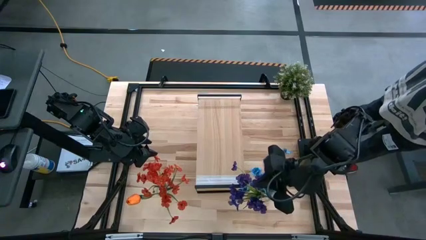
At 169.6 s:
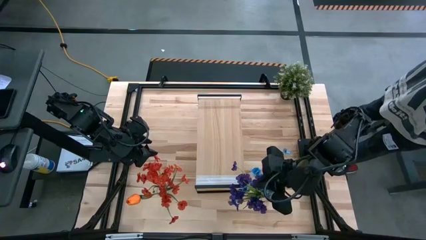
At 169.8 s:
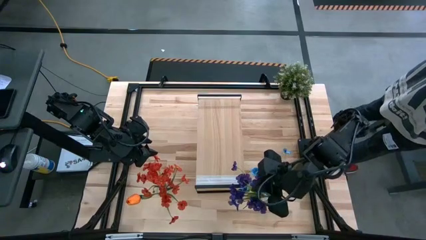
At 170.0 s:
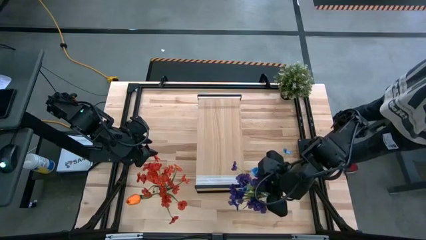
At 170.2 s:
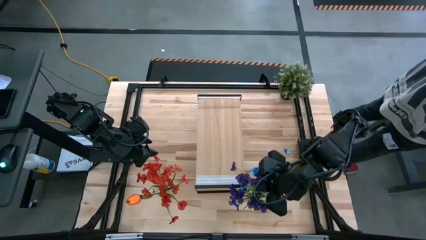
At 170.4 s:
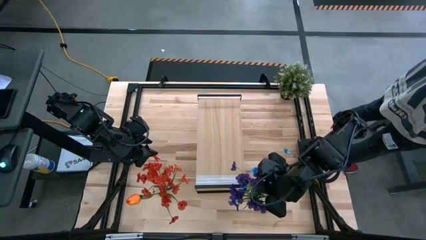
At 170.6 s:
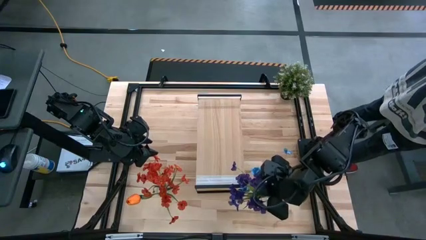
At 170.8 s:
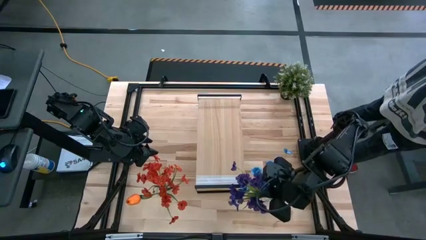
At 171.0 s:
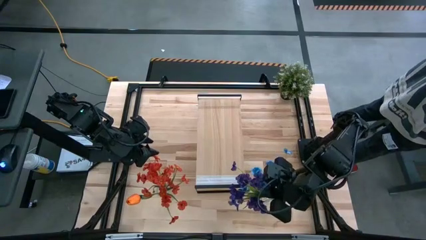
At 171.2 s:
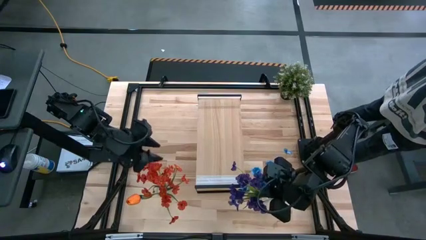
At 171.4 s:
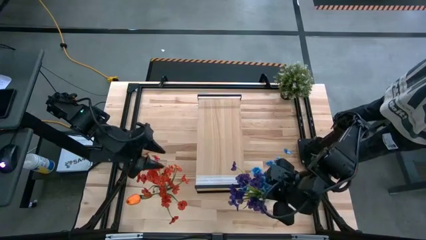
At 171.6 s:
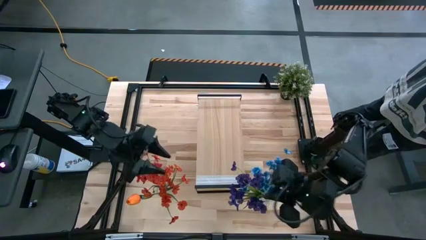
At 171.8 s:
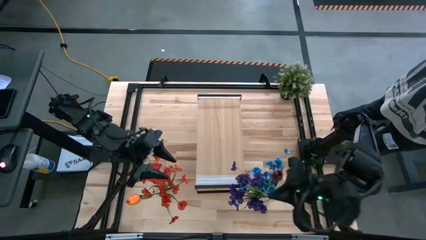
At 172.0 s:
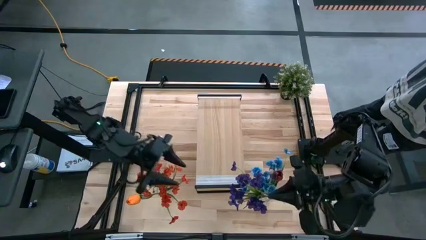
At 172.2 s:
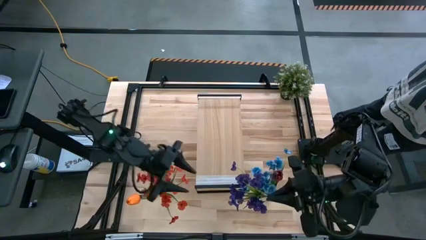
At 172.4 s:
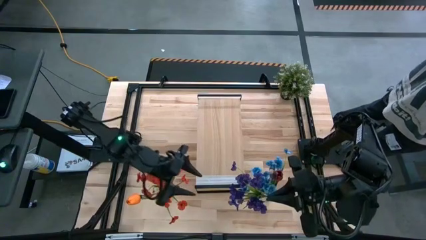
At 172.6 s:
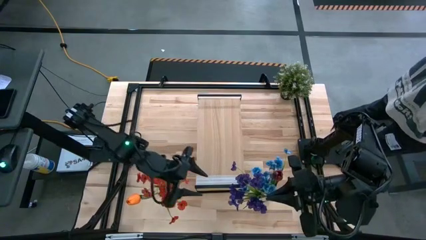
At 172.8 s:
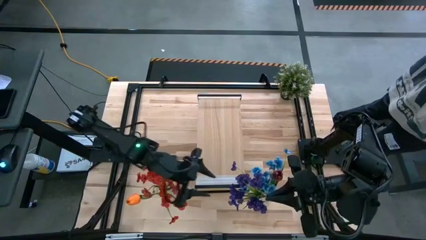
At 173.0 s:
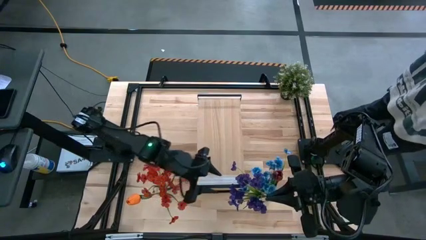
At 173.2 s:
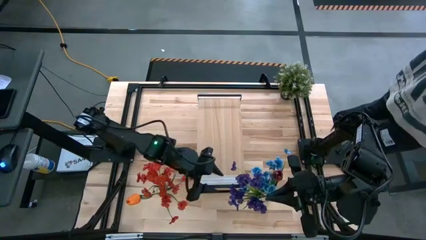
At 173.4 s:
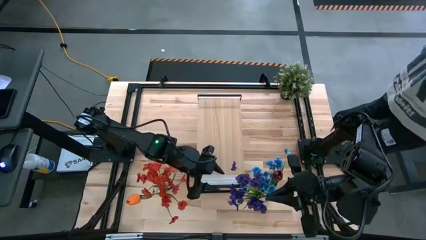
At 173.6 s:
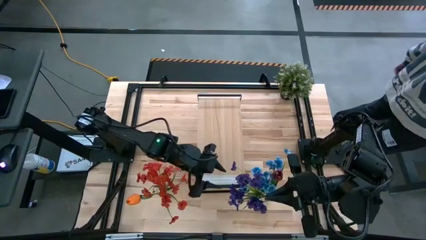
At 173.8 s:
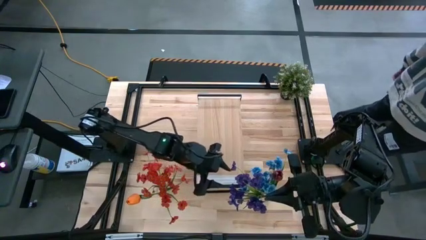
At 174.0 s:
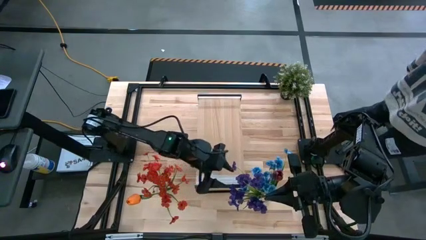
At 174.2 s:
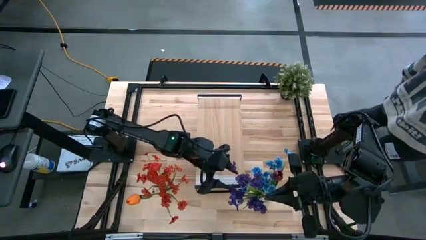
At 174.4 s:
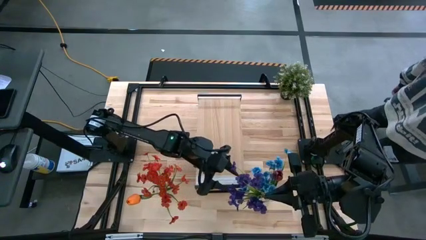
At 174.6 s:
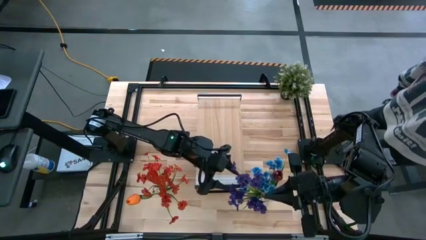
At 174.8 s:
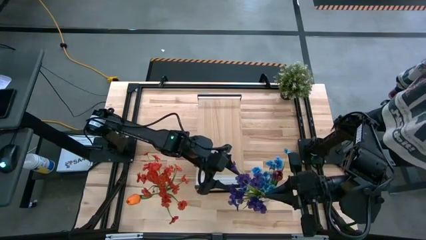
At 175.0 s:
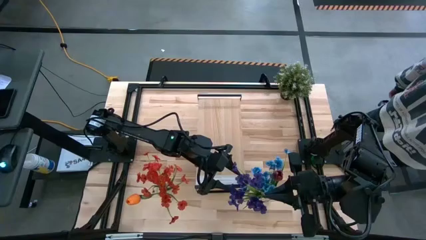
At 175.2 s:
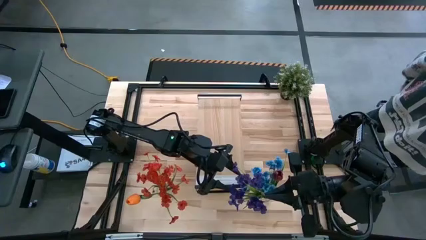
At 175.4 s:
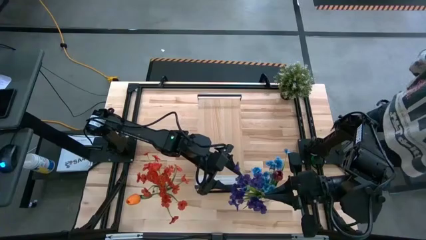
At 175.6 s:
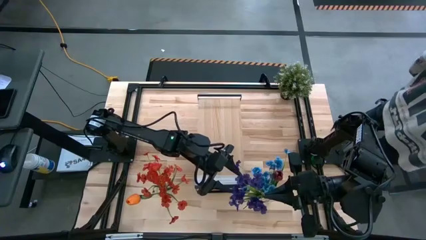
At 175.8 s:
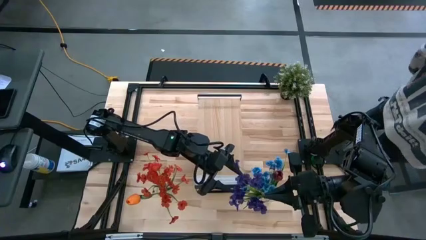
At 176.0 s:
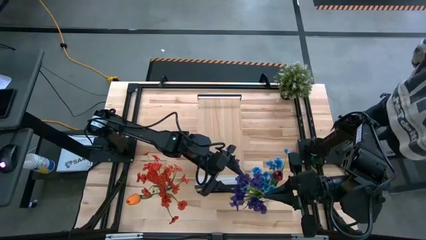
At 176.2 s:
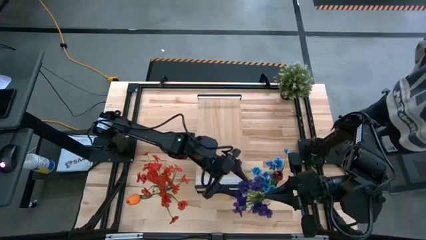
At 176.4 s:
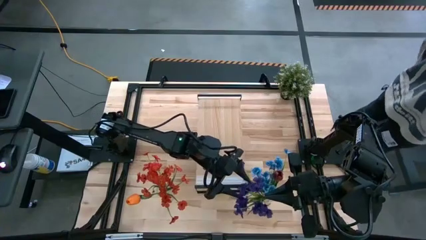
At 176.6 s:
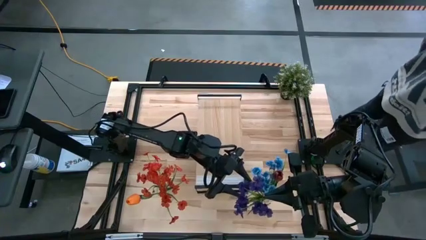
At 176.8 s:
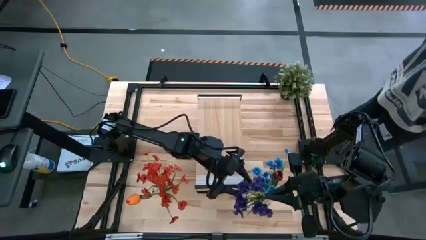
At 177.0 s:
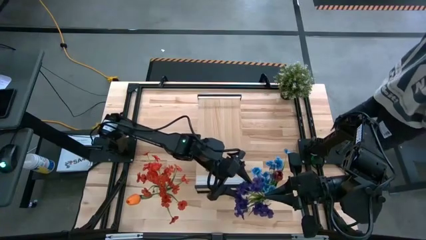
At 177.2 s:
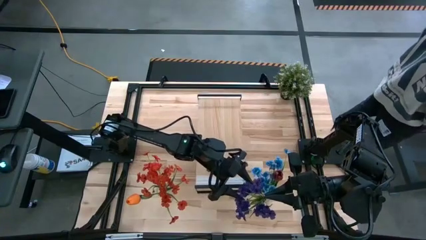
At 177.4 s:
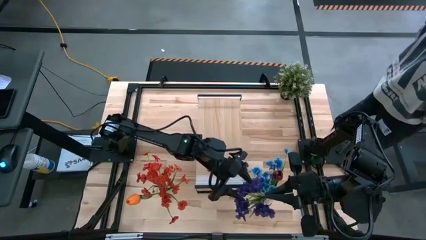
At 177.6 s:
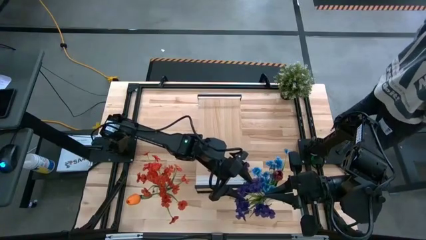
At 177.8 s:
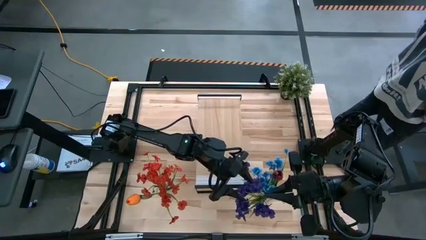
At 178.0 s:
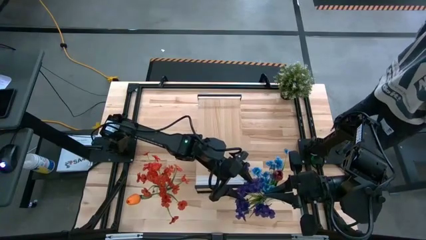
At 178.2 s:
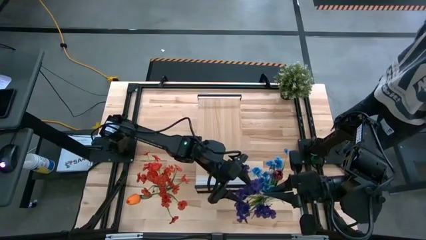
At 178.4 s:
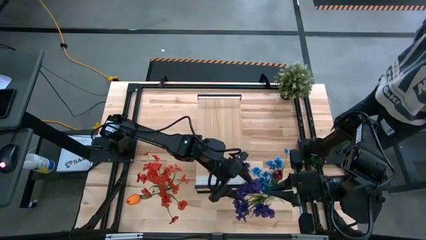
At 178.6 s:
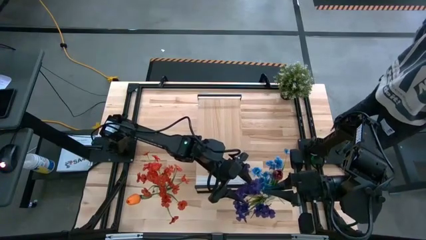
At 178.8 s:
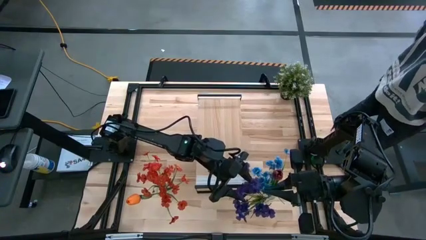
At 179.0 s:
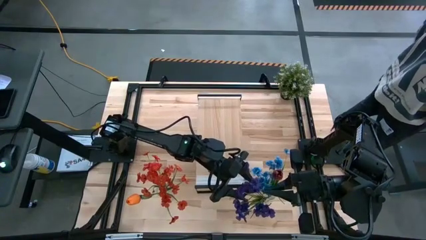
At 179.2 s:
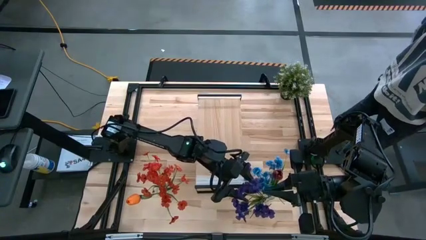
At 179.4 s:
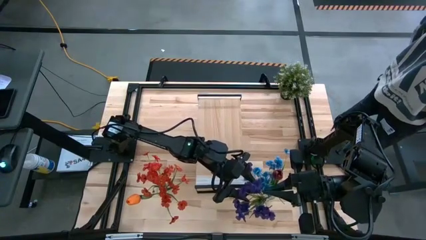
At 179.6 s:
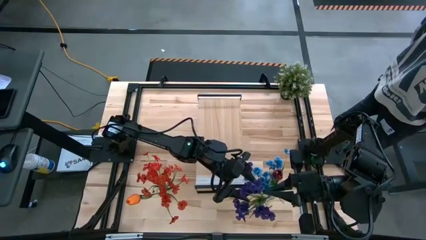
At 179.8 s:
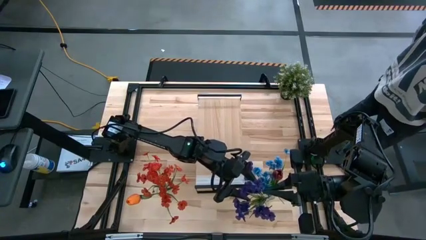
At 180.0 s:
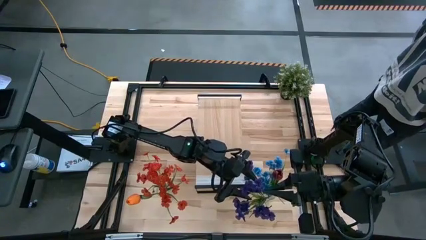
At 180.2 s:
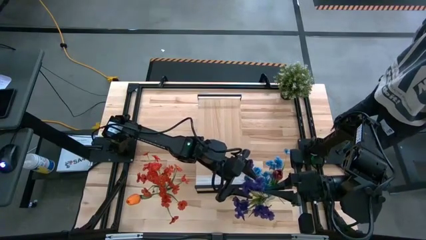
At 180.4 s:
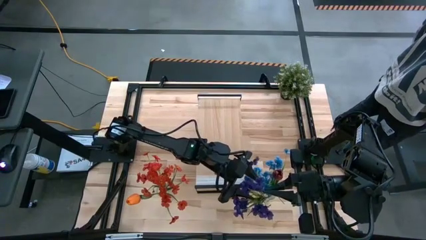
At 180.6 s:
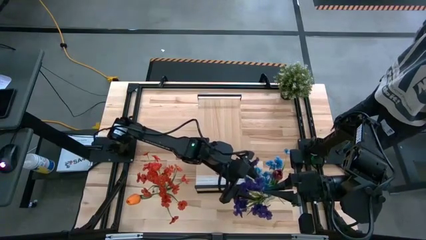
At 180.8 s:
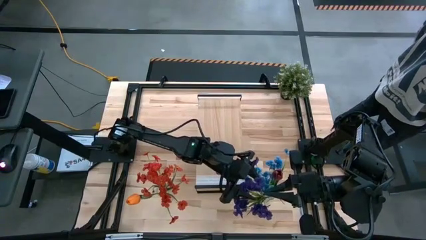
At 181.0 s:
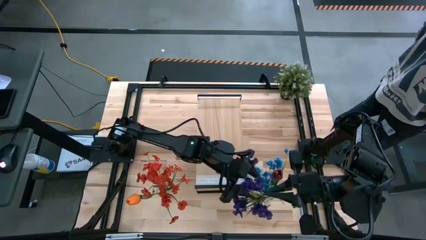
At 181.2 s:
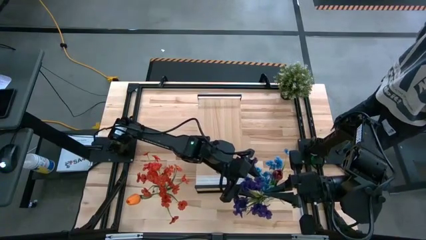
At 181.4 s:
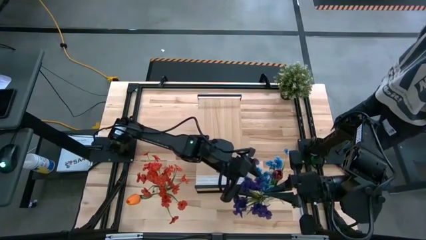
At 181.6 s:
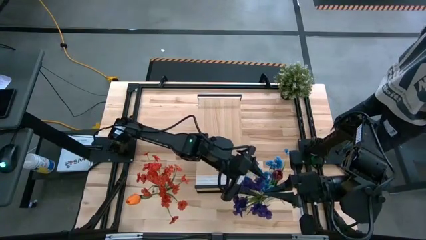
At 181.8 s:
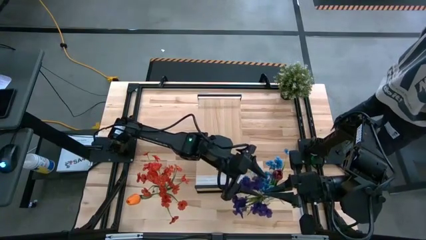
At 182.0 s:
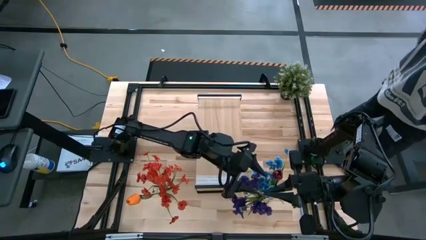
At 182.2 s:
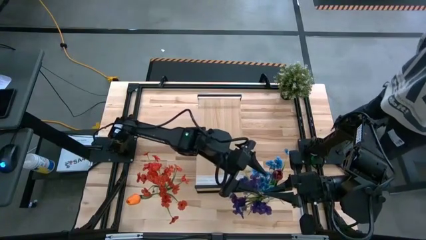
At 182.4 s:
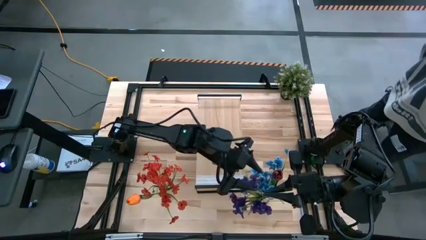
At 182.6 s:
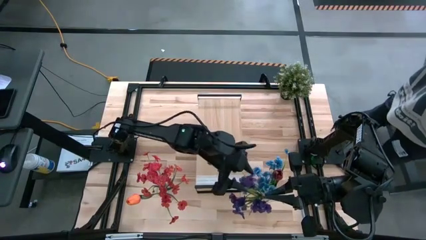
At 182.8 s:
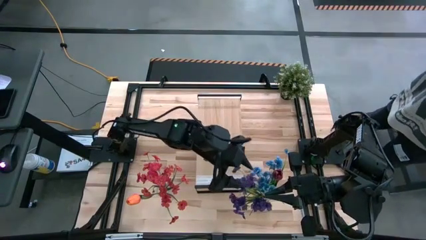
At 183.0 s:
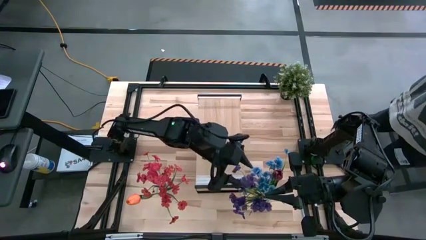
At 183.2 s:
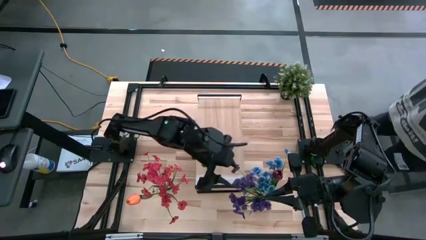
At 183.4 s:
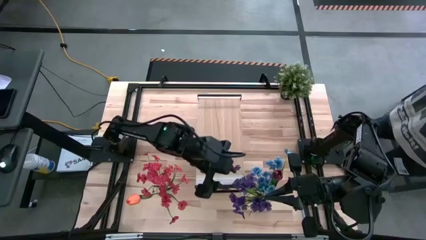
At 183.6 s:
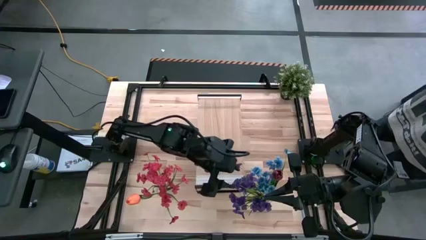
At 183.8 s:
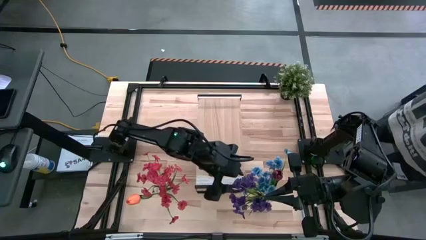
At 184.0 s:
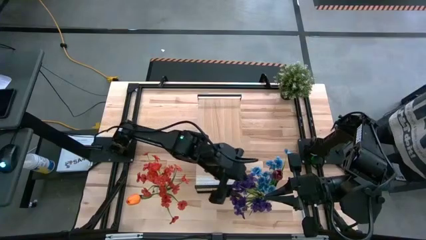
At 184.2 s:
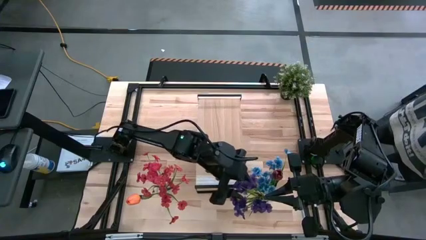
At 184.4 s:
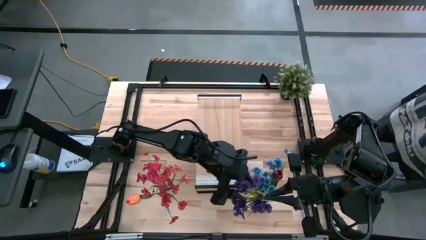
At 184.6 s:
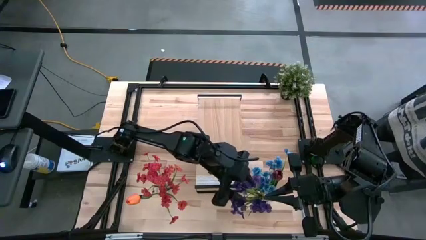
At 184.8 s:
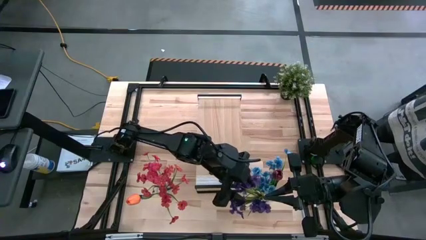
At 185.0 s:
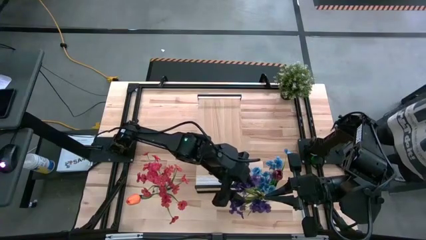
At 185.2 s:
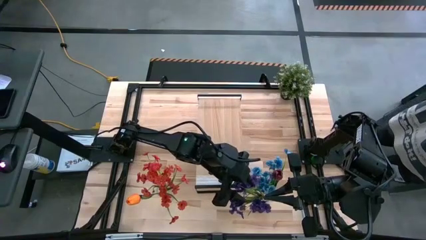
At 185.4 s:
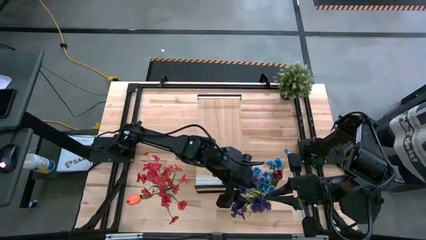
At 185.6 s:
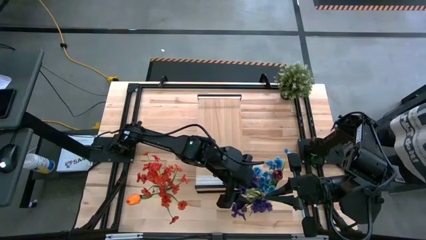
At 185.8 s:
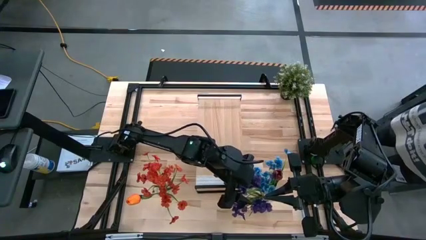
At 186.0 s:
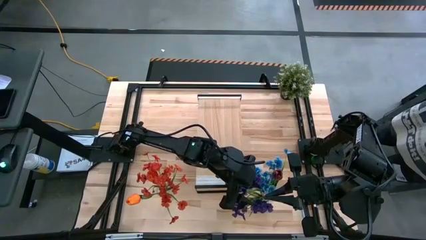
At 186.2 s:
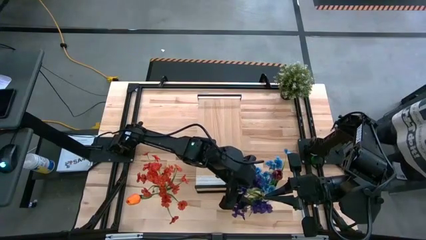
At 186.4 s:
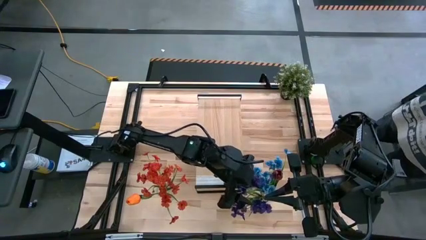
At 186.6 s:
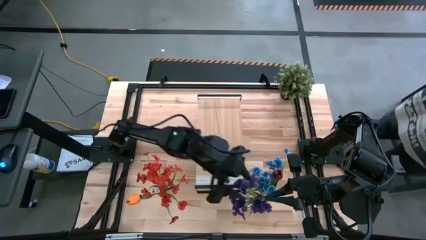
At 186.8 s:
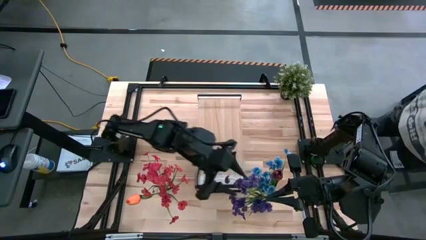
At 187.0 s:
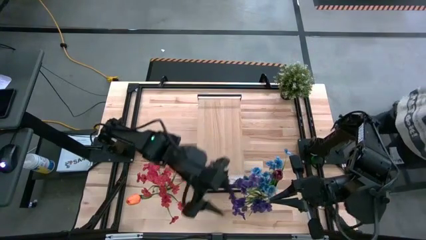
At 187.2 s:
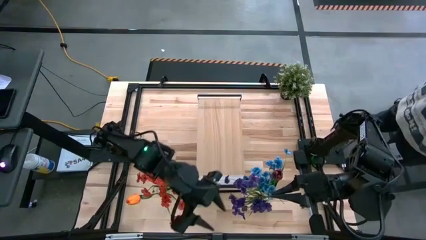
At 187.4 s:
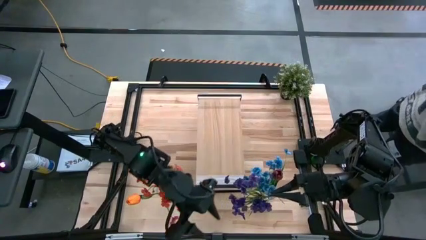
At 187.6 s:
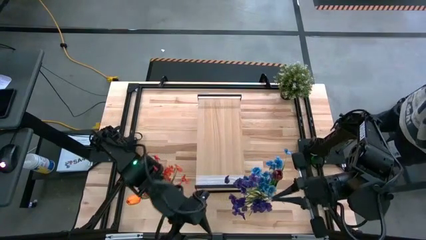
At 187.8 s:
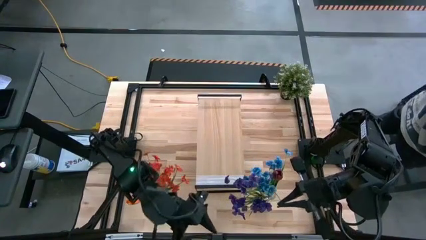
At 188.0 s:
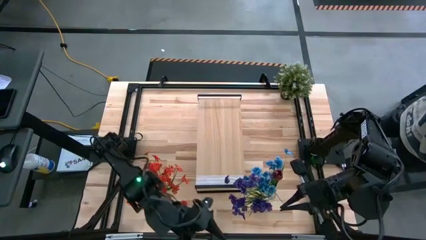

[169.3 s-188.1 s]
Task: Pick and place flowers into a vace then onto a shelf
Put the violet flowers into the right transparent vase
